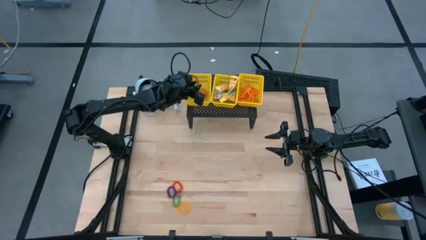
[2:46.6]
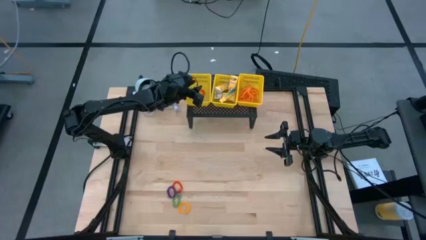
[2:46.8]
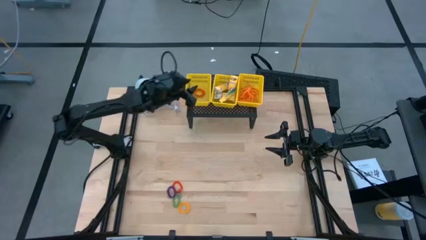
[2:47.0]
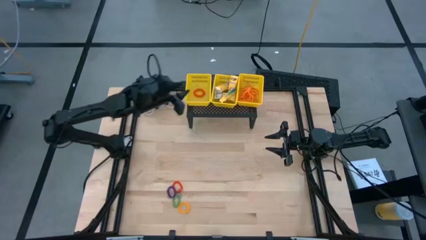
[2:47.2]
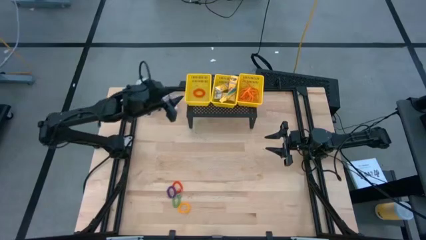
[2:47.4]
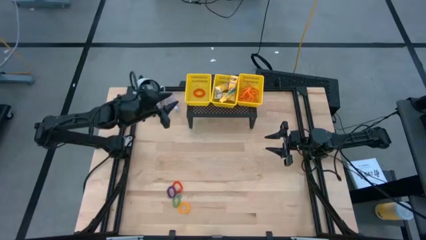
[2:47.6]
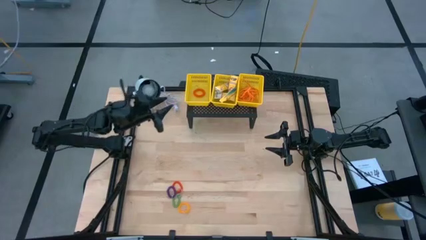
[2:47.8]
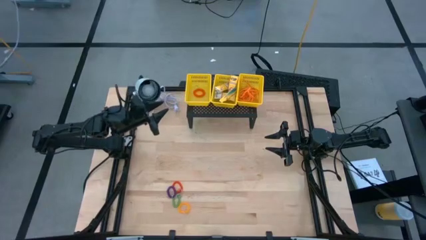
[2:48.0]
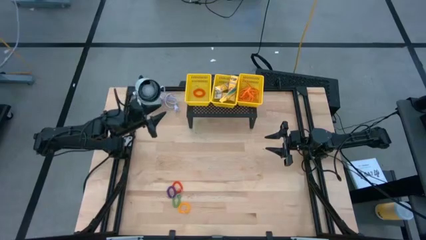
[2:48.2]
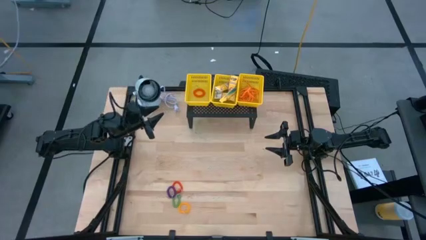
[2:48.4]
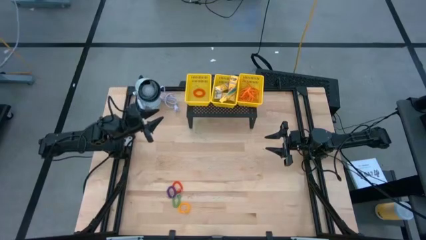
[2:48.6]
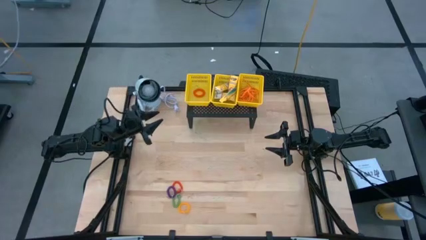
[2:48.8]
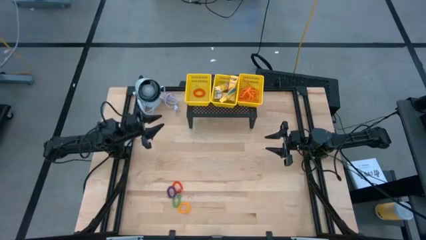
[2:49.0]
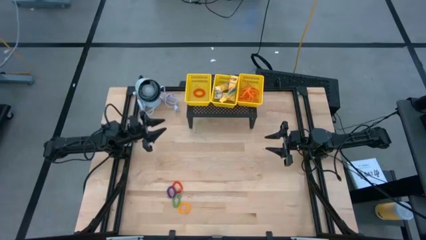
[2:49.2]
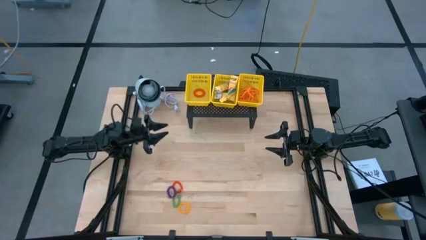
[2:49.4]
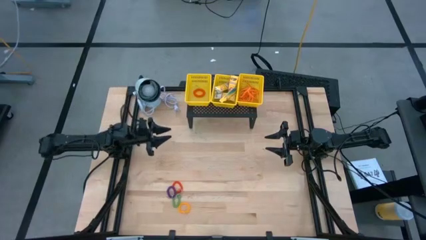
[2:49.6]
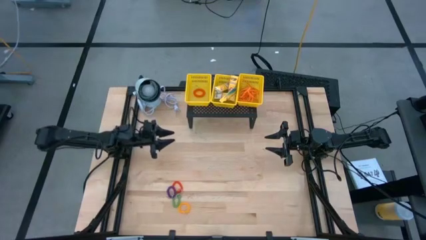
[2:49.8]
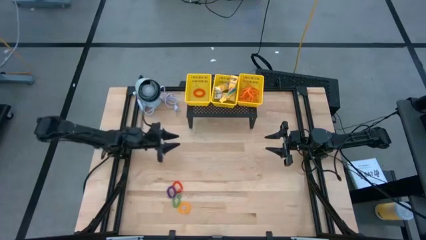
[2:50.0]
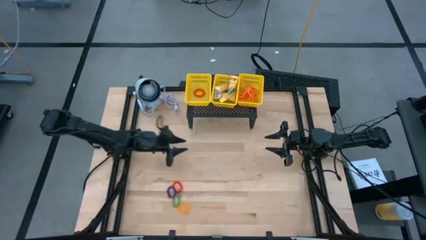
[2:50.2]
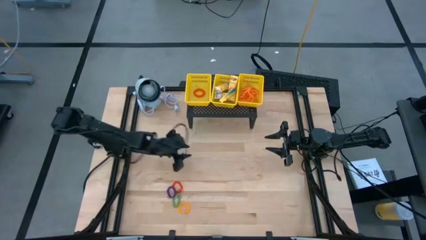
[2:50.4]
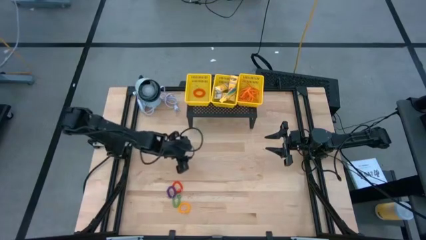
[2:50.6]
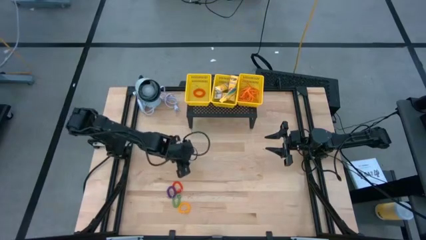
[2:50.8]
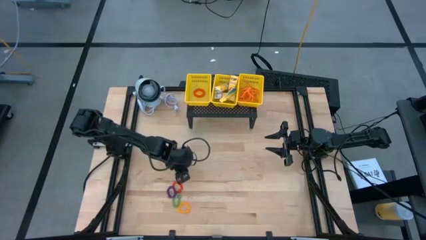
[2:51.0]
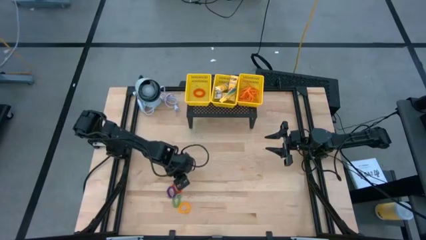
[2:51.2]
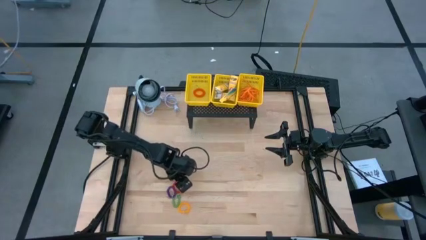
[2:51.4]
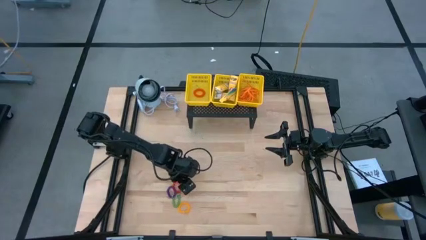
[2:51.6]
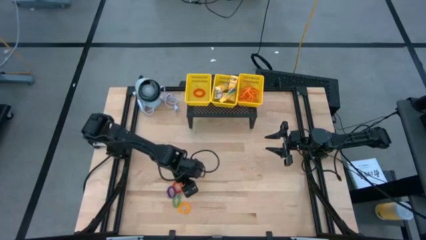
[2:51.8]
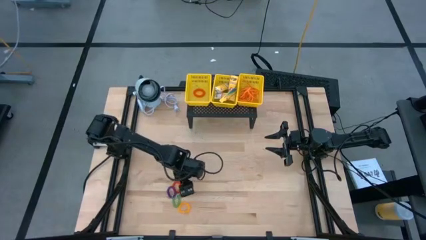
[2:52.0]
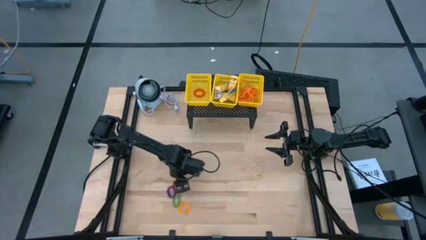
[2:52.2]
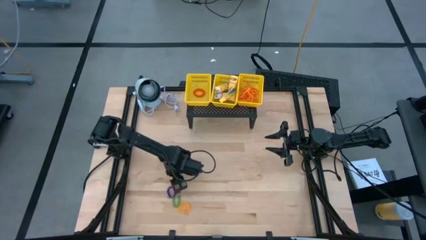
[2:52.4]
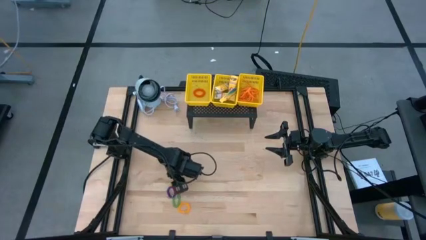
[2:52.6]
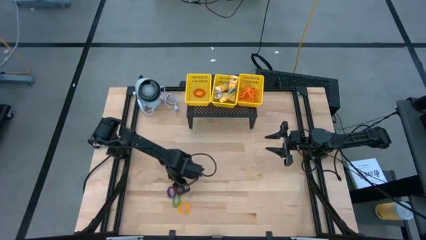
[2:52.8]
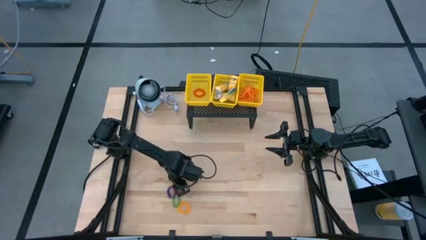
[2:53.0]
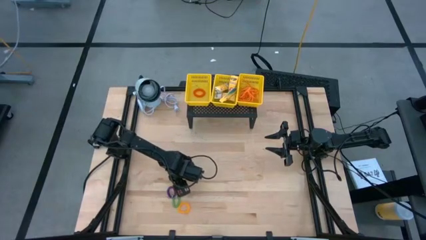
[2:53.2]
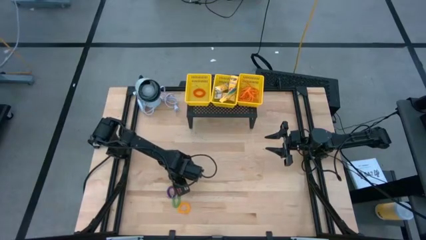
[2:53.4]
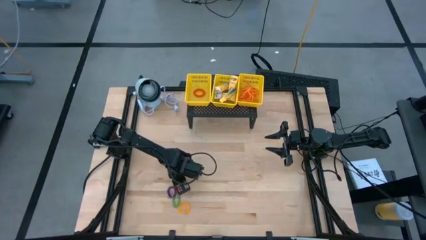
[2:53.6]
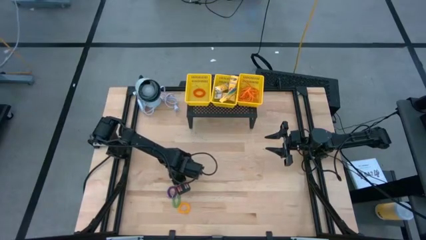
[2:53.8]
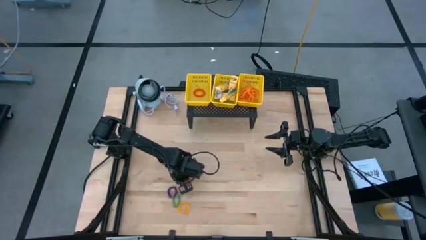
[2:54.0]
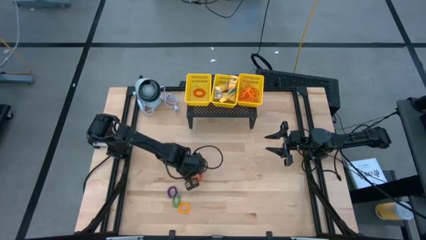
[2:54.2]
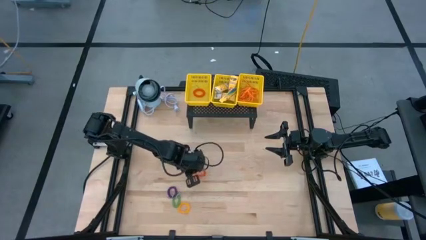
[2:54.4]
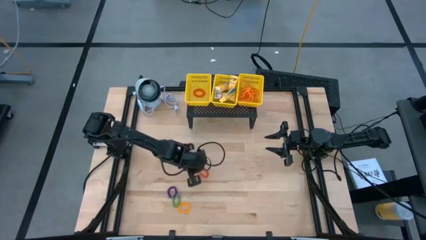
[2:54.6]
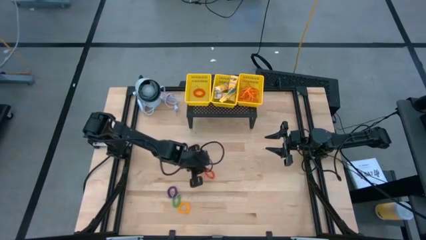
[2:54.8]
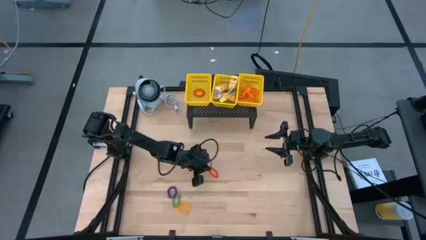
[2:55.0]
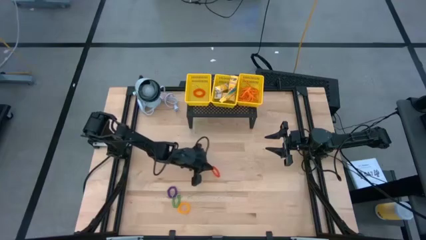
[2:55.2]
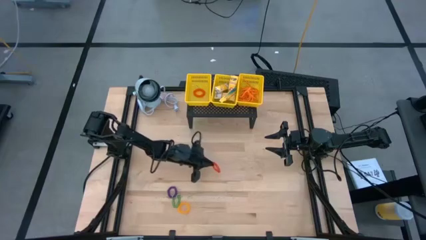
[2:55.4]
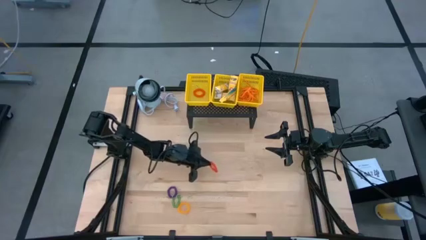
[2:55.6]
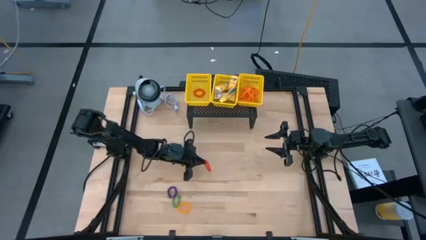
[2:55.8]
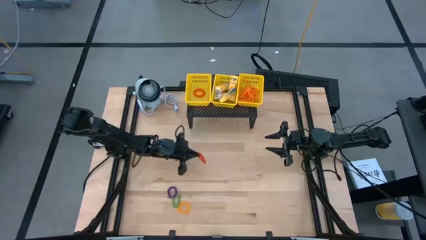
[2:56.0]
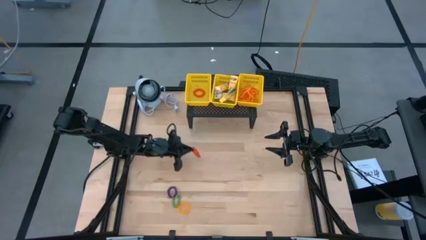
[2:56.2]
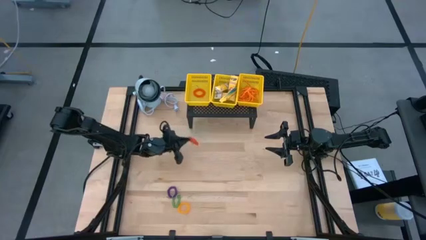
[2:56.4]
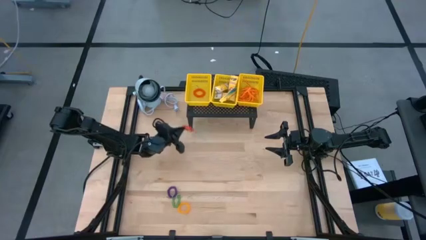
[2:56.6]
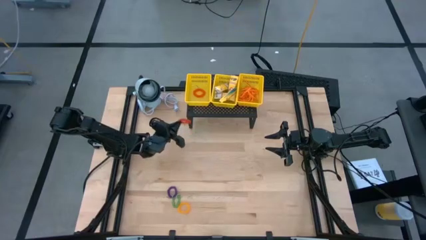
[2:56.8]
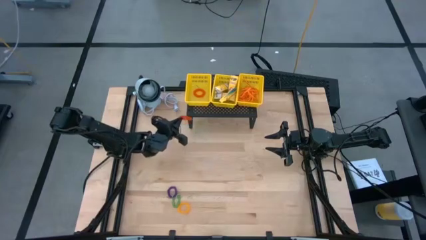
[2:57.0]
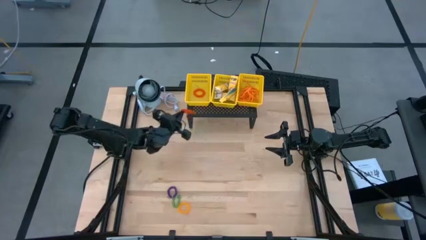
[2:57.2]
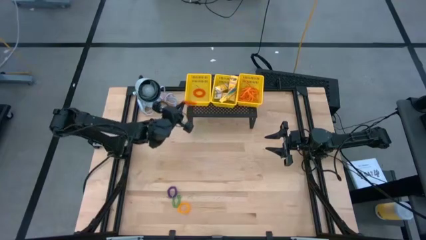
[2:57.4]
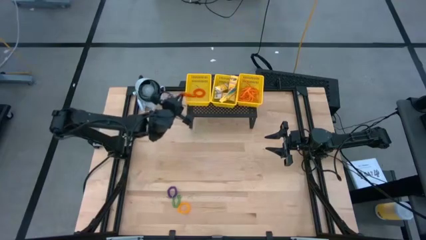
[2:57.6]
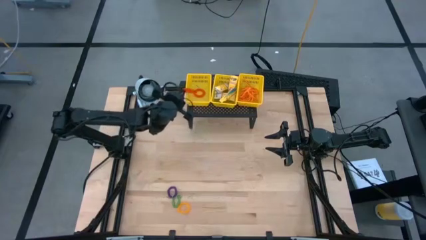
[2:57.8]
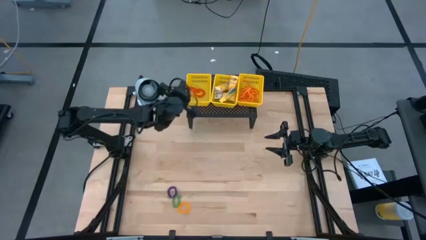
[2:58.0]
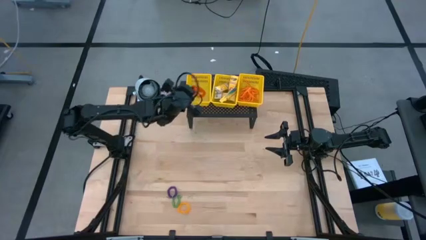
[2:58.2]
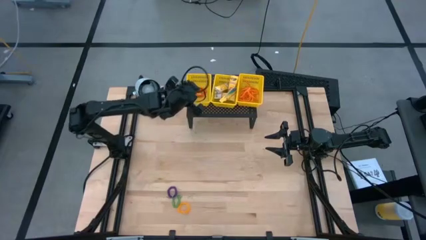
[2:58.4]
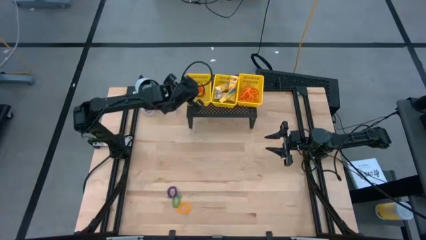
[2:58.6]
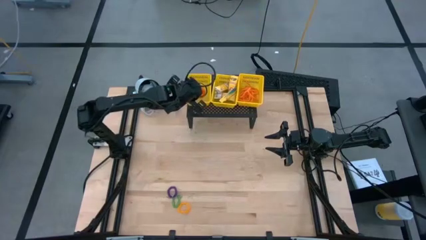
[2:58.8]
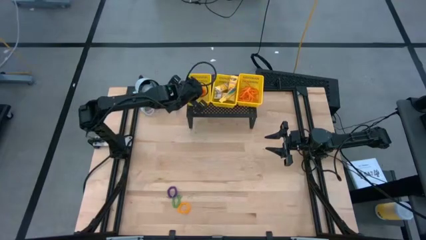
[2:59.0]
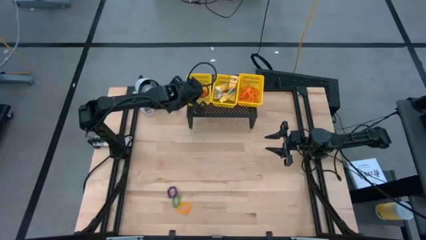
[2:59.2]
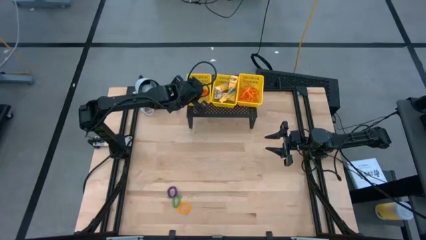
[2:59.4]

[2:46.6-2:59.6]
Task: Pick & Place Office Desk Supplies
Put the orange spring keychain into the left yellow bin on the shelf

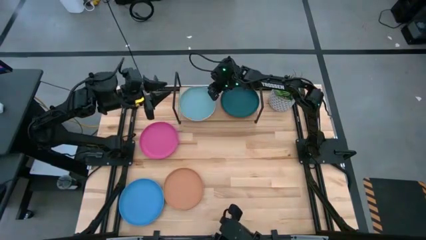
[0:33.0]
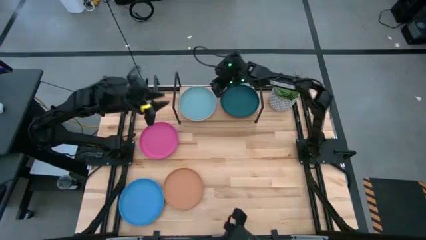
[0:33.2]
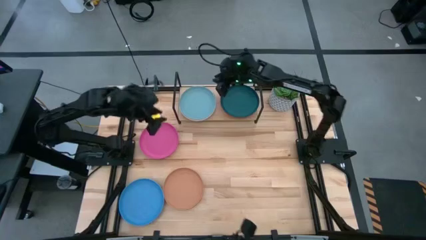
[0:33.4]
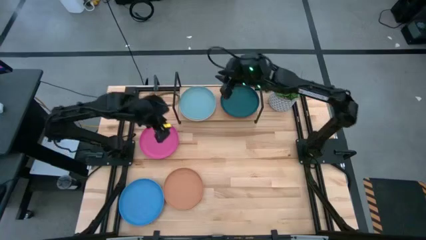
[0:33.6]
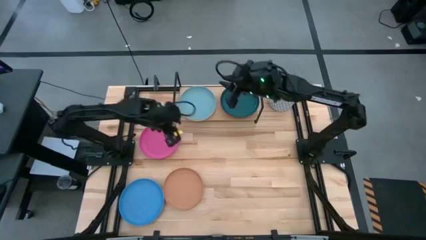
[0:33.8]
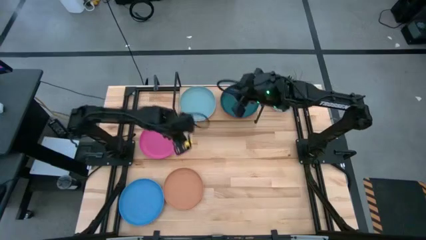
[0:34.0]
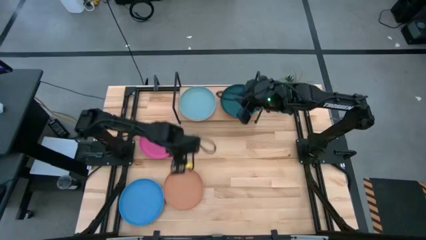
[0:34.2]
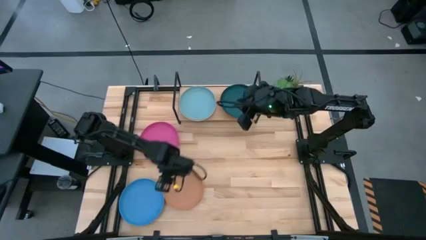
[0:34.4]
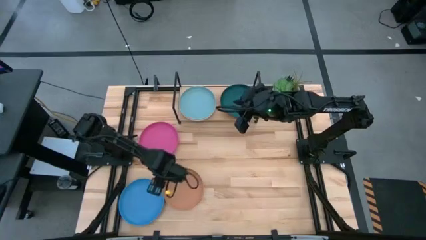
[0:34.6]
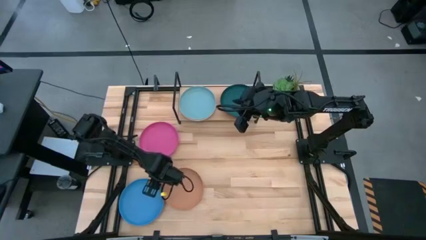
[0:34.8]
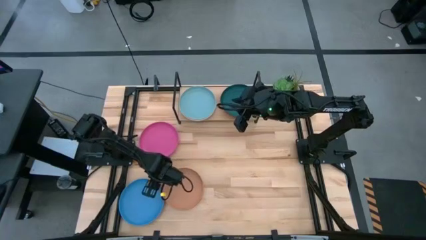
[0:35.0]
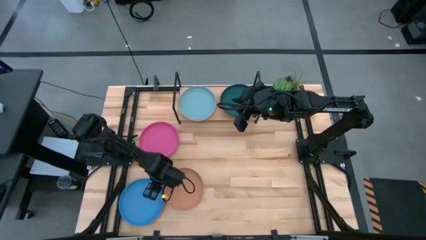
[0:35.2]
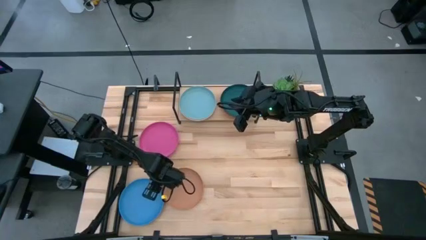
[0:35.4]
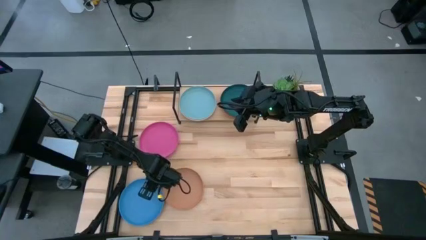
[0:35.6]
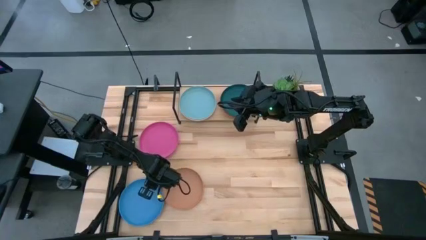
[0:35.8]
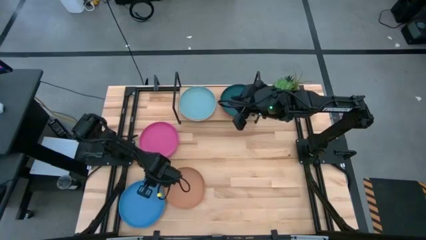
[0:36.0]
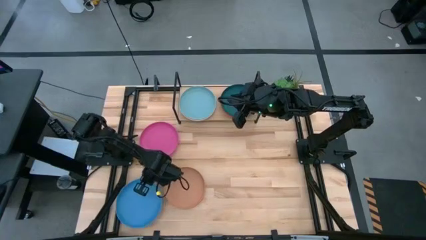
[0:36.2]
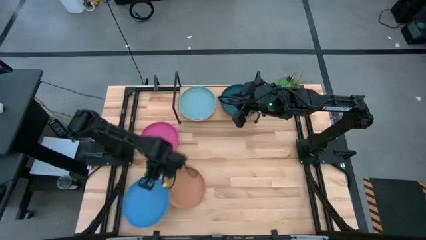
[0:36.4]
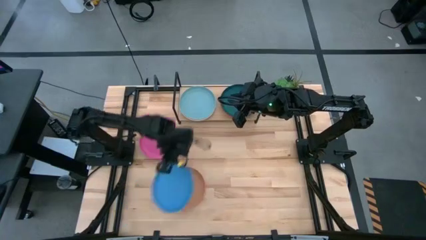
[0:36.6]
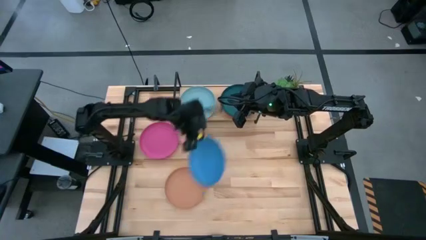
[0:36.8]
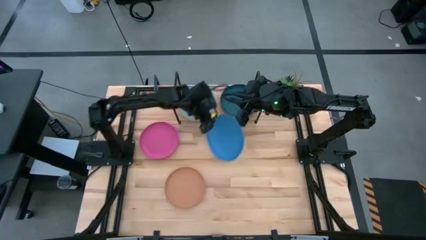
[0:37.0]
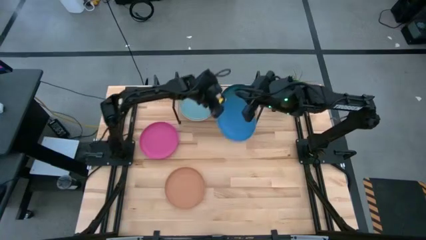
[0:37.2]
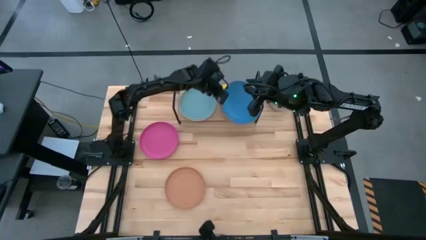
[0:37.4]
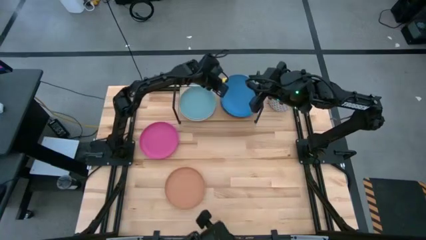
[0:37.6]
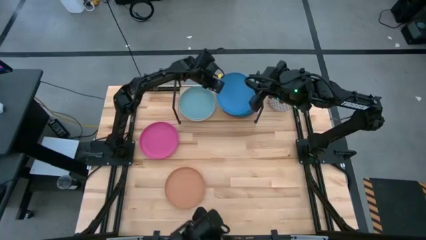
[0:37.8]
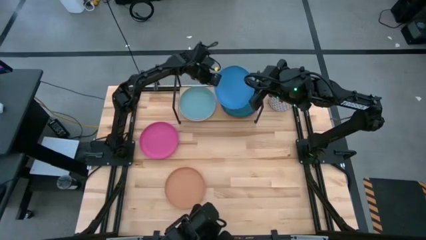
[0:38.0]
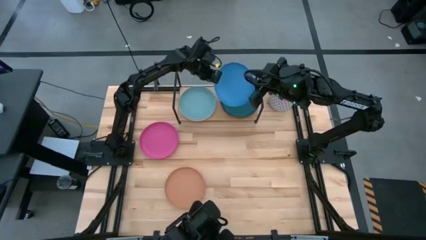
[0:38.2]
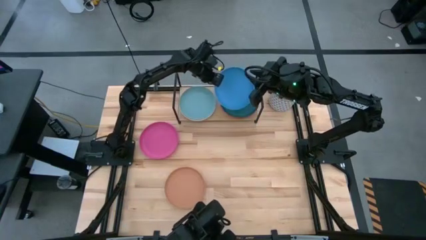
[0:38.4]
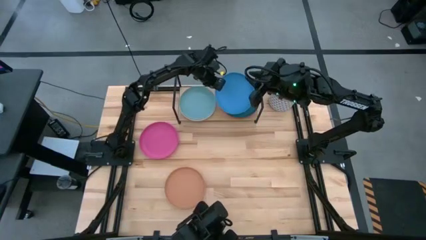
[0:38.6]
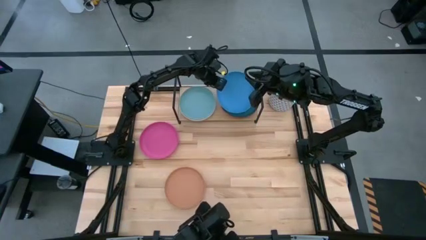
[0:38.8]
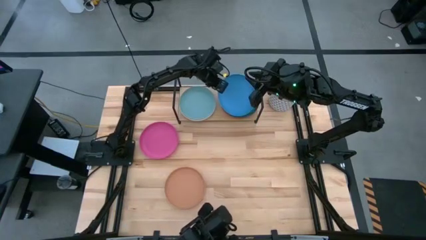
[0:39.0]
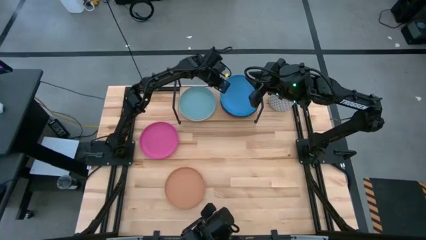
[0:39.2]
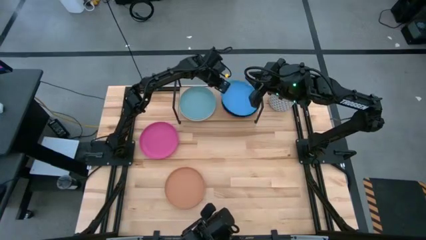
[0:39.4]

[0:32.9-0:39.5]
Task: Place and stack plates onto a shelf
Stack the blue plate on top of the dark green plate on the shelf
